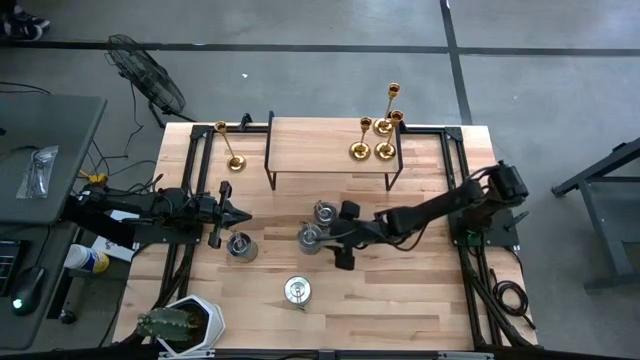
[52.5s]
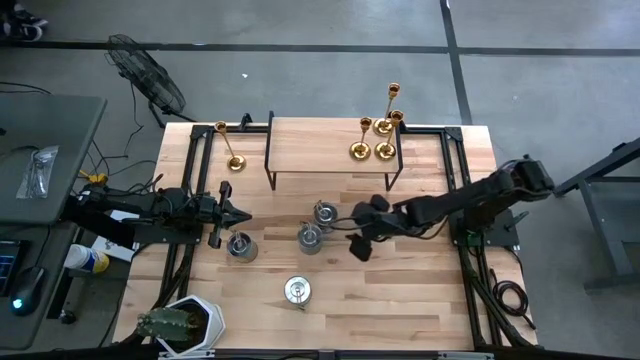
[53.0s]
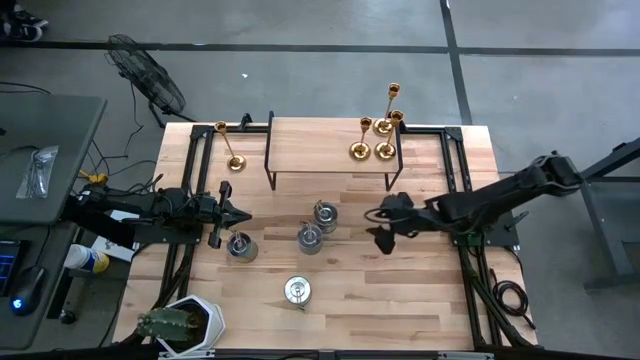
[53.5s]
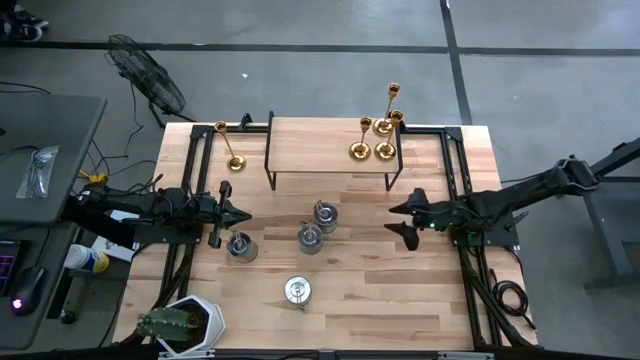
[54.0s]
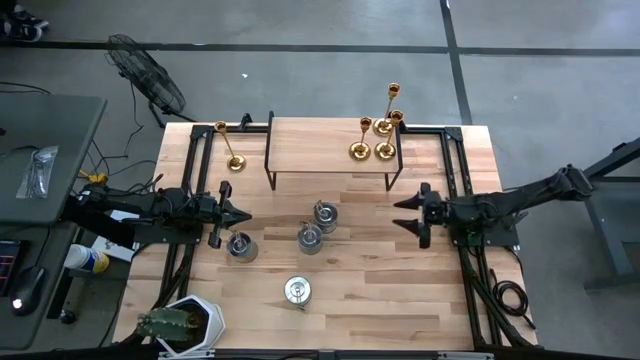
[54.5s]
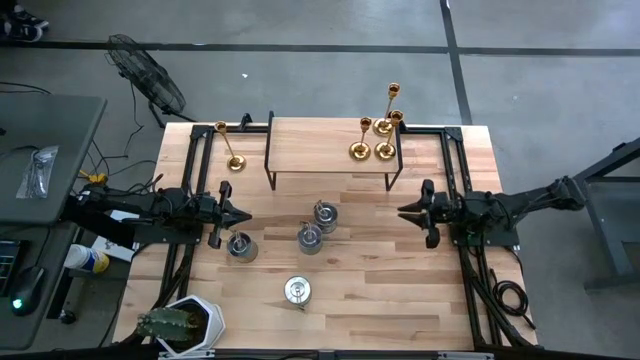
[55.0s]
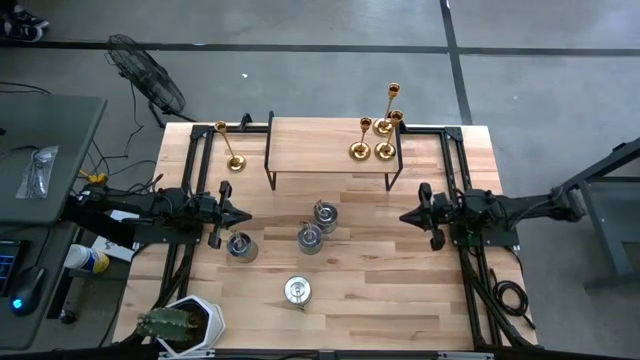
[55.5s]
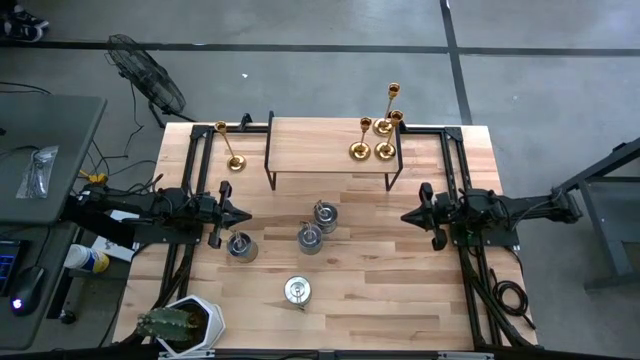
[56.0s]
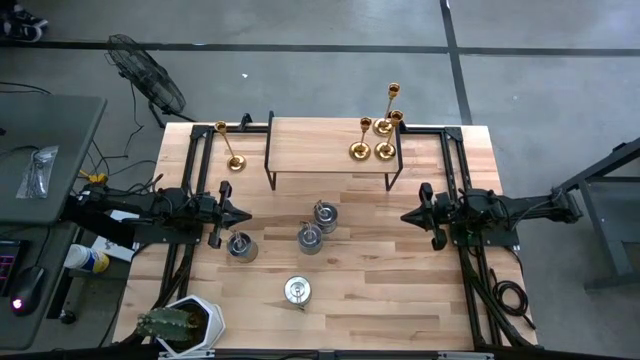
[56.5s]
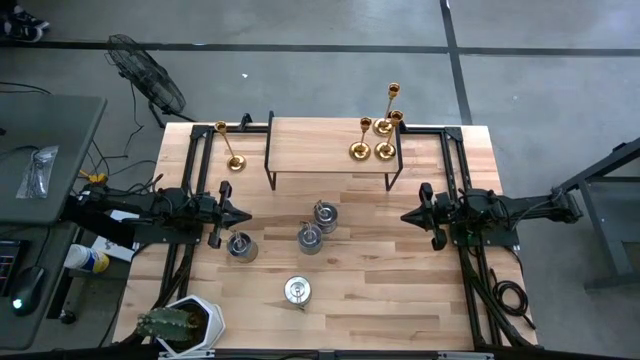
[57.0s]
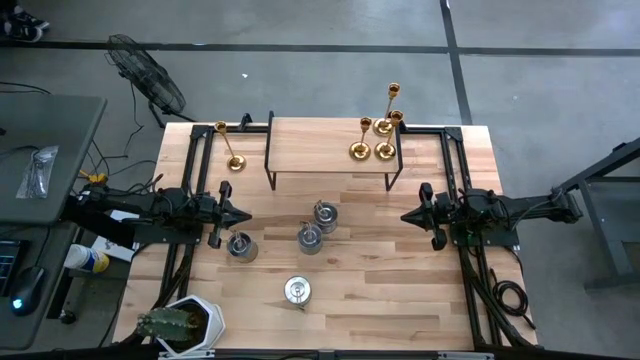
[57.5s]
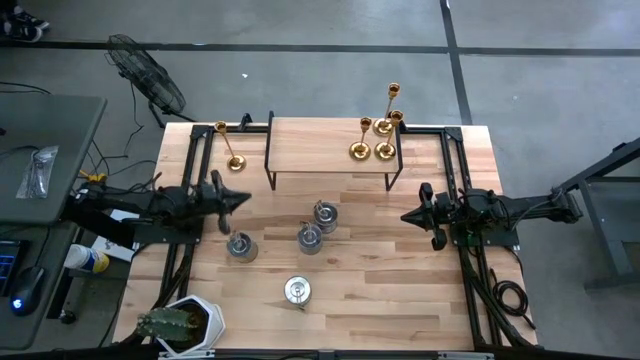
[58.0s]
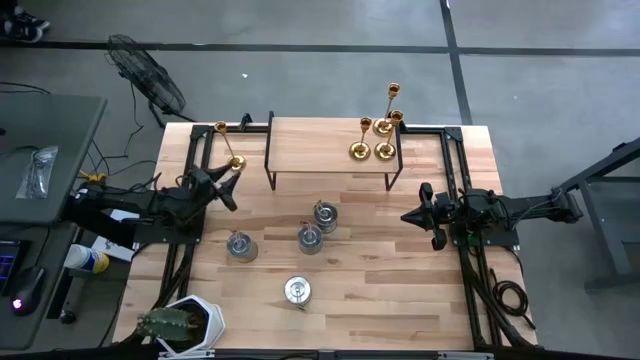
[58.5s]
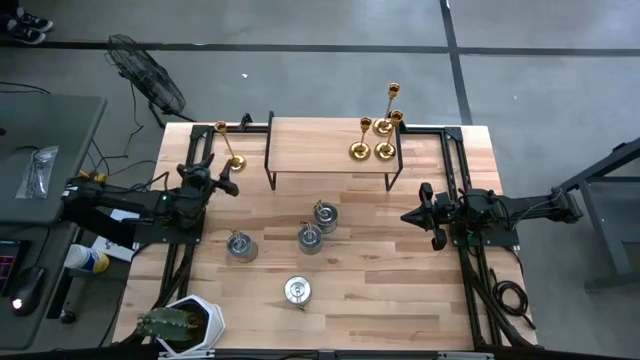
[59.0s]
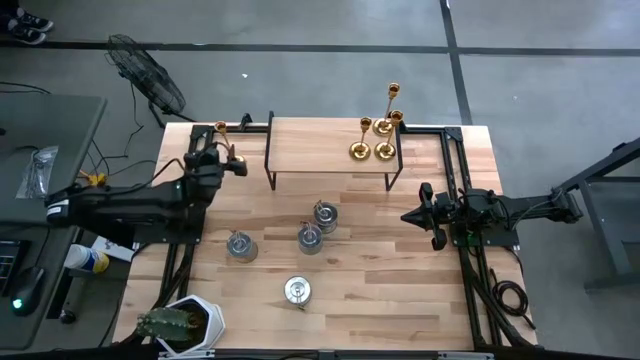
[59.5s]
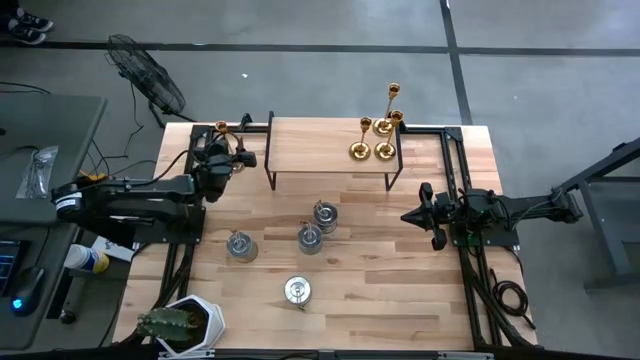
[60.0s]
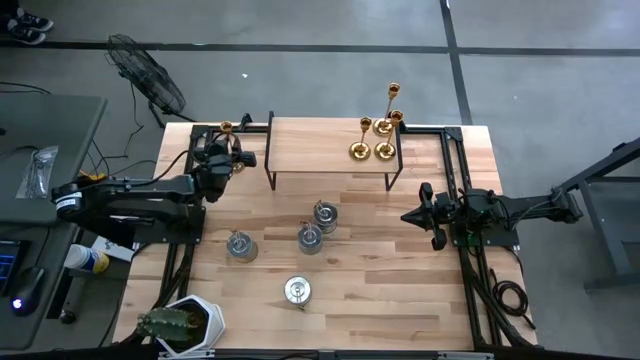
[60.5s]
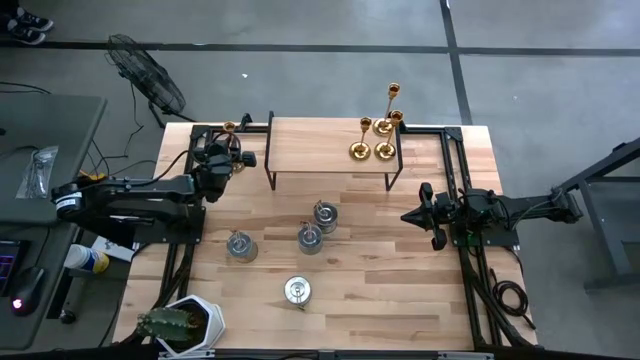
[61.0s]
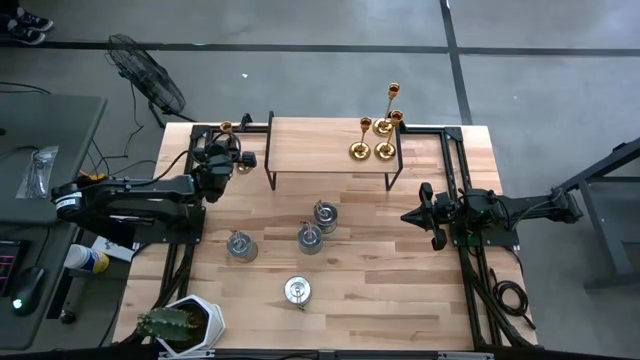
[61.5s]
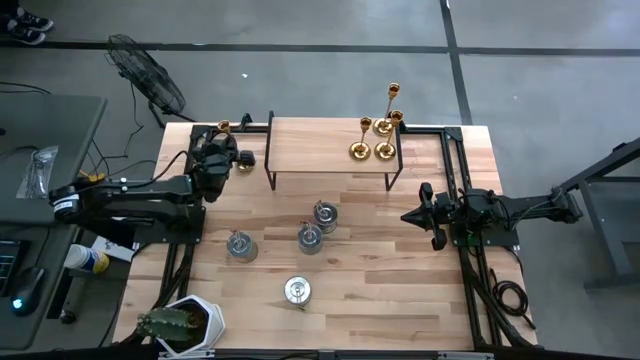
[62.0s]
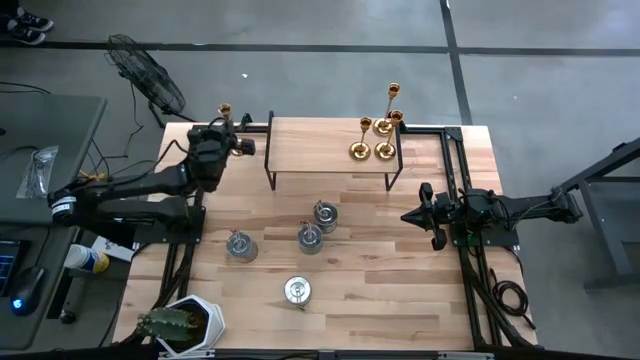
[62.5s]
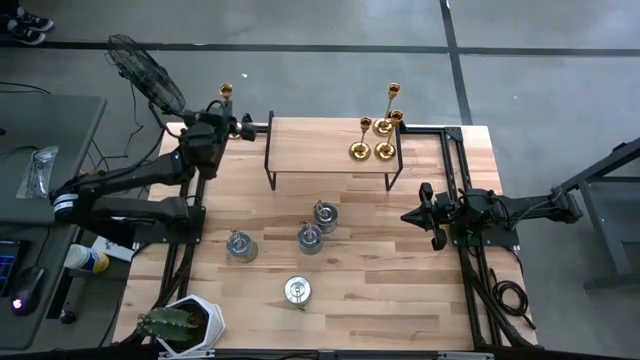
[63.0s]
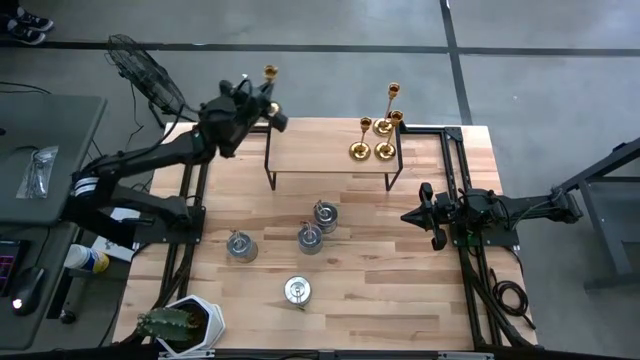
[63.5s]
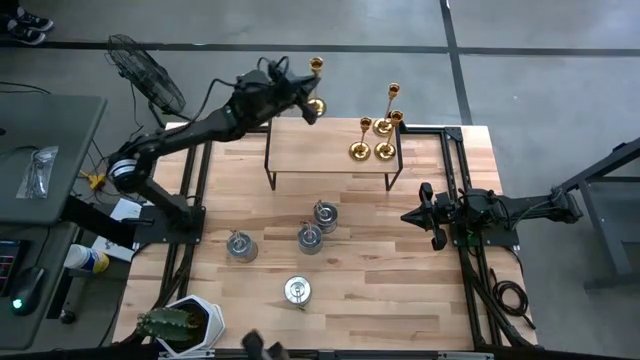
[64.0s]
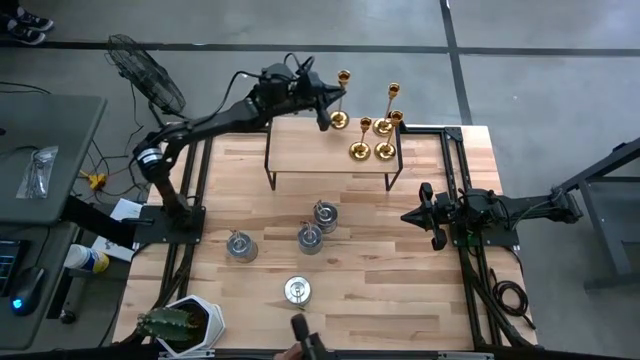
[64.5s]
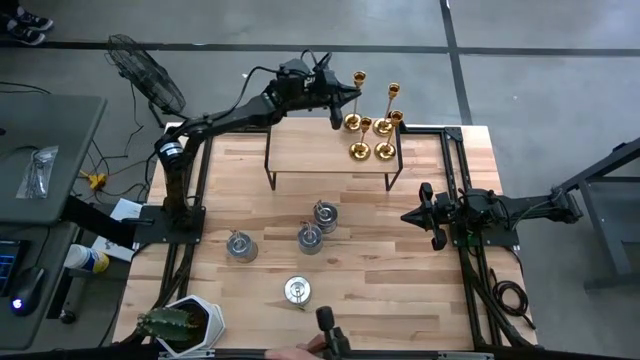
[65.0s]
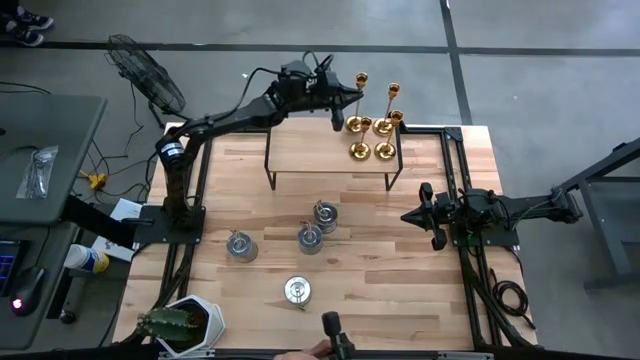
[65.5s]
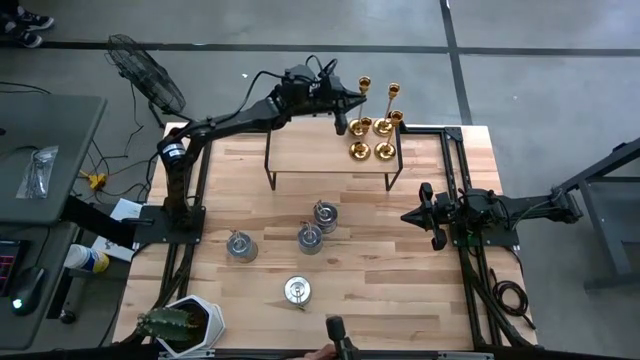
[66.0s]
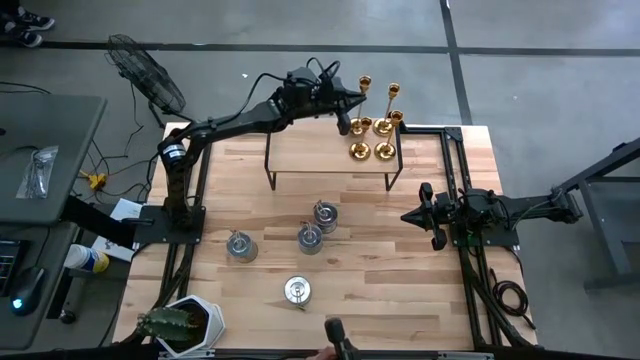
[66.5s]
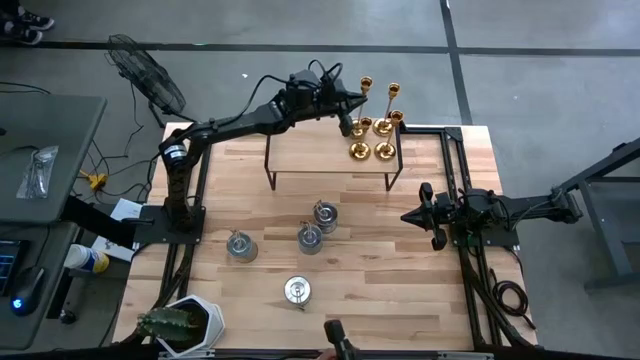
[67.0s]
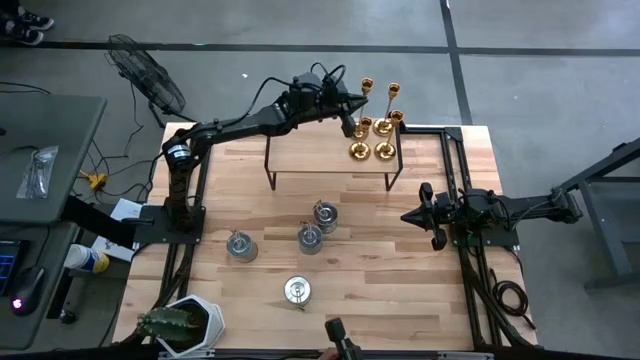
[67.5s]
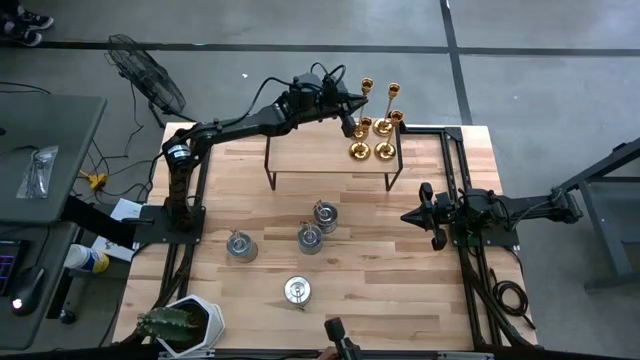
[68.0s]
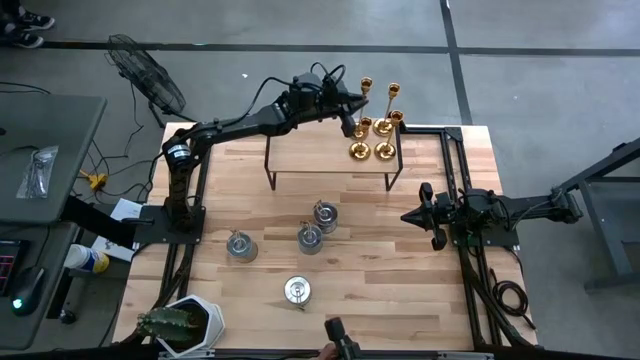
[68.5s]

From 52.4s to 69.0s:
Task: Pick & Place candle stick holders
Put the gold candle holder on the shelf aligned with the other candle holder

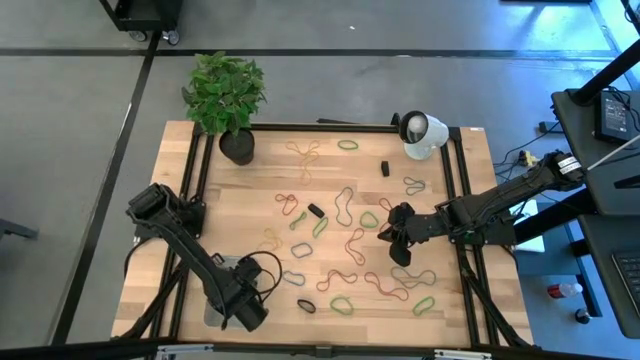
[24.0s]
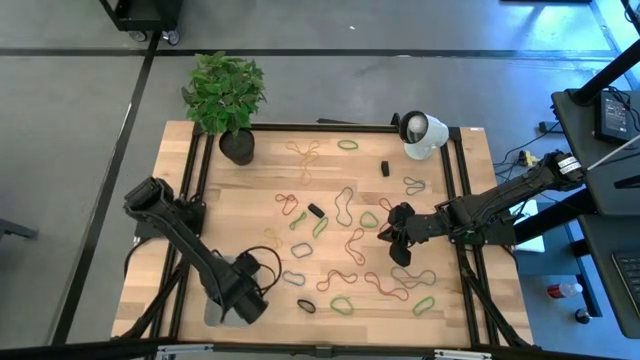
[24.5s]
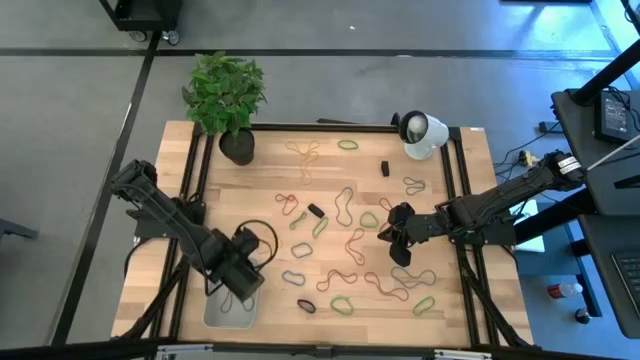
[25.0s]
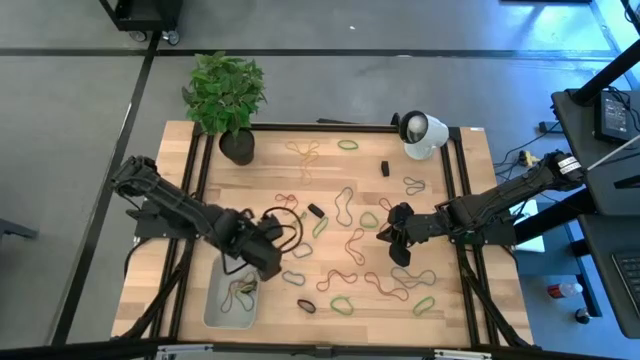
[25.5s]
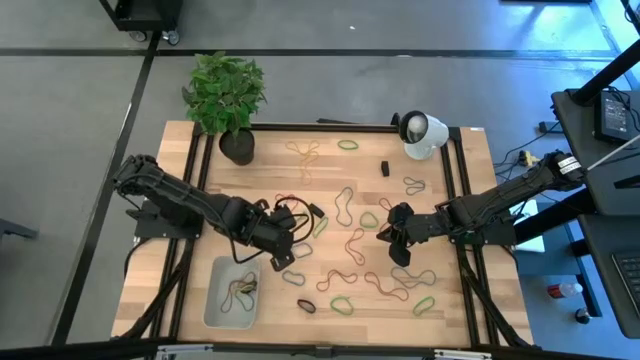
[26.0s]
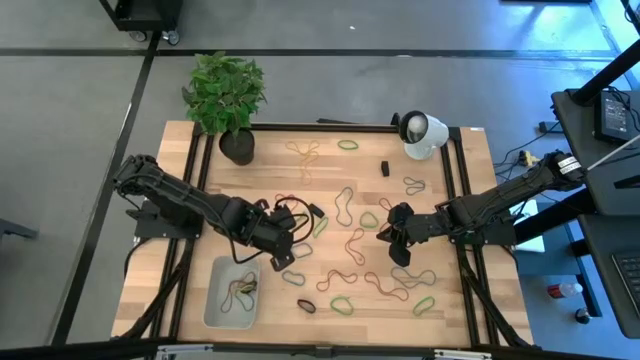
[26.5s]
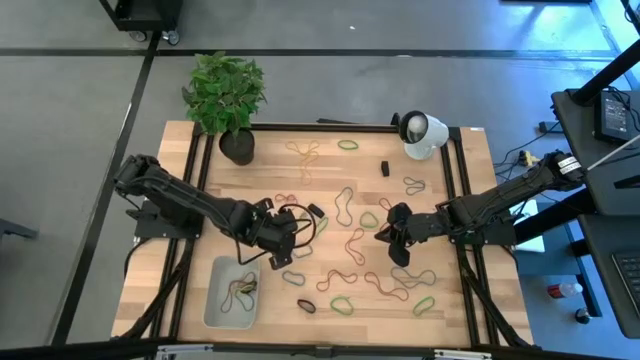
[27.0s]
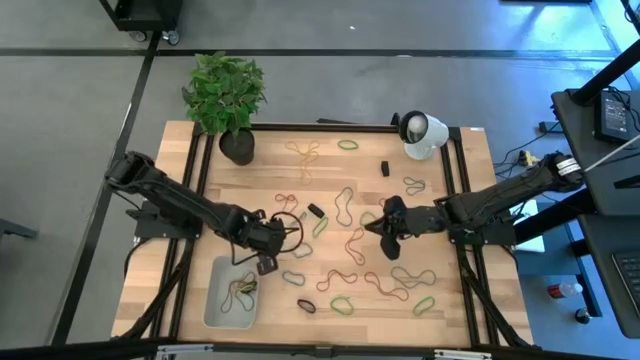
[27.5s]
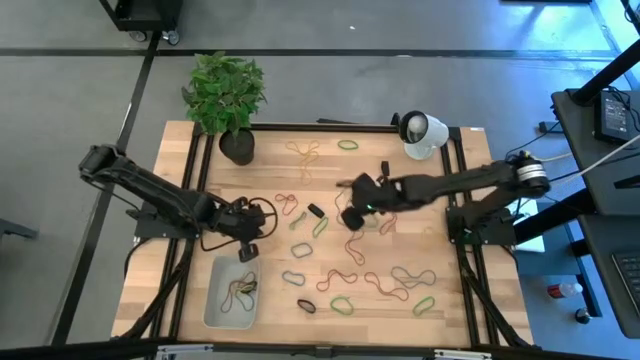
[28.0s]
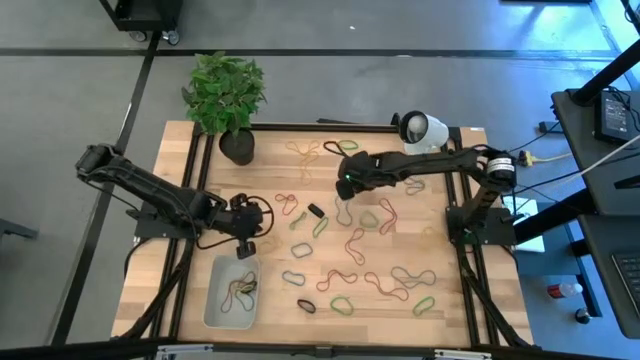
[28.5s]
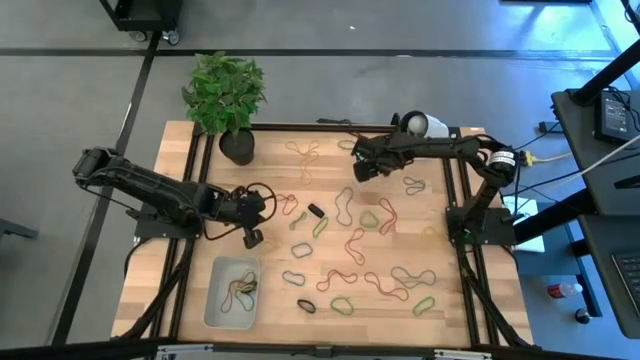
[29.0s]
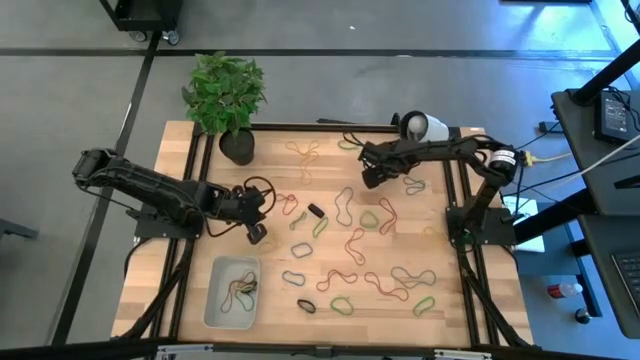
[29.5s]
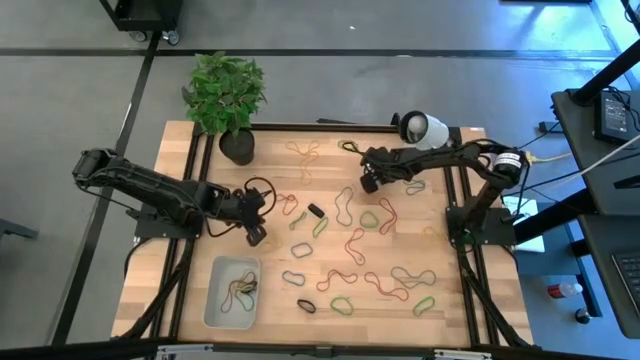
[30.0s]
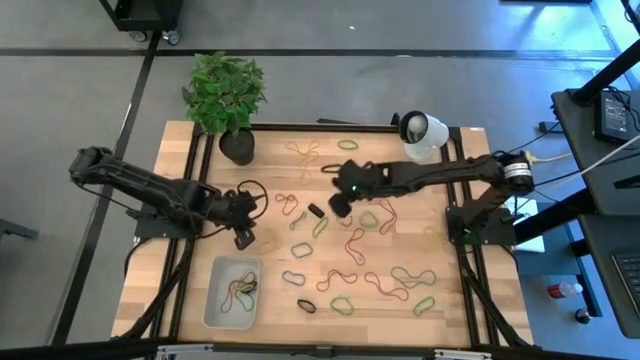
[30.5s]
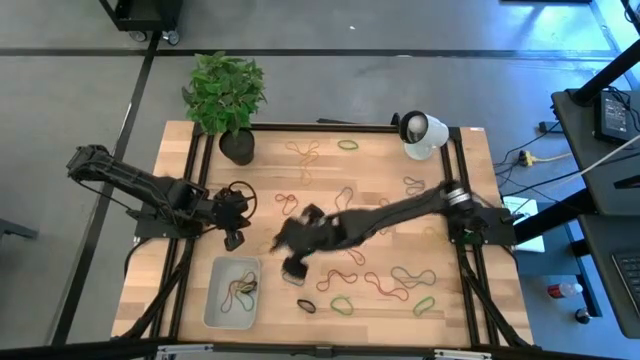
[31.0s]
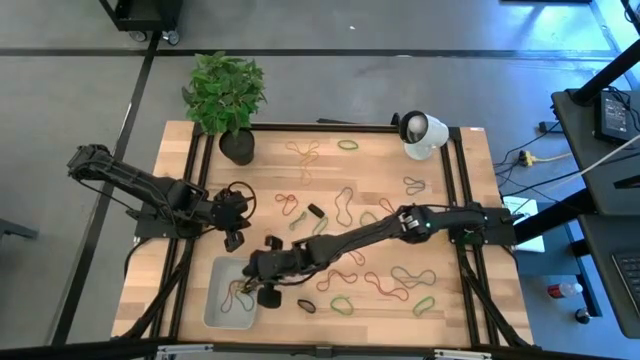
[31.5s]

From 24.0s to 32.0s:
Task: Pick and place rubber bands into bin
Put the black rubber band into the bin
